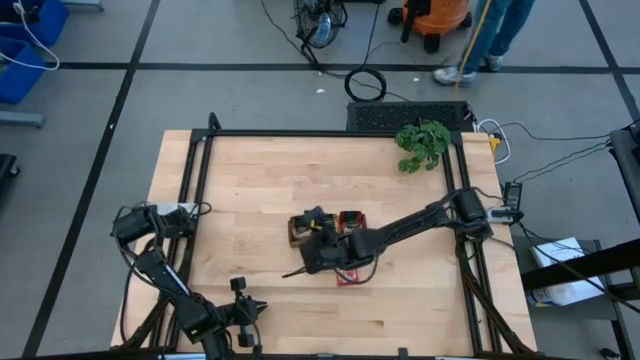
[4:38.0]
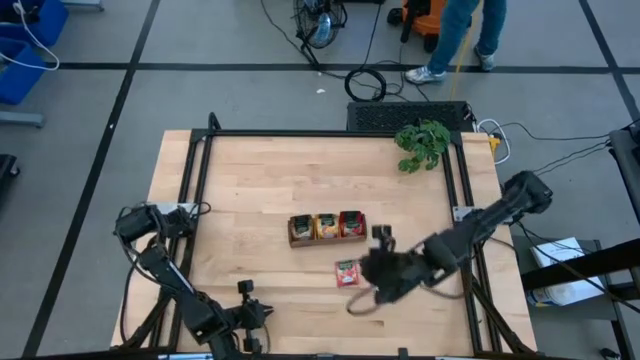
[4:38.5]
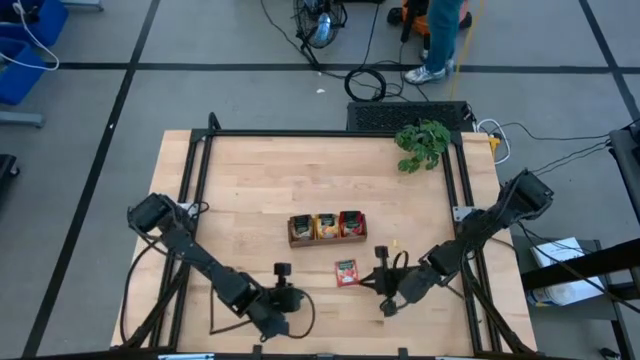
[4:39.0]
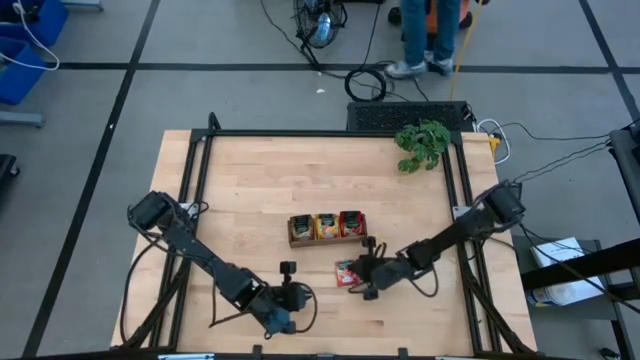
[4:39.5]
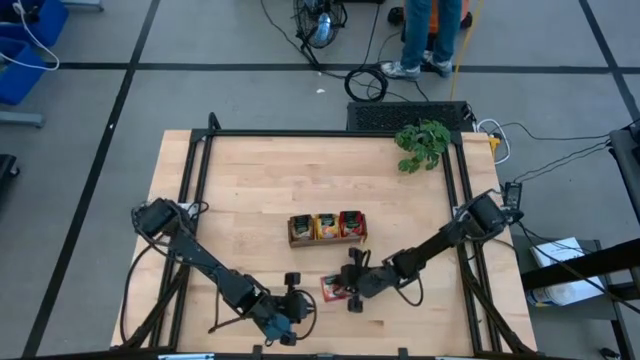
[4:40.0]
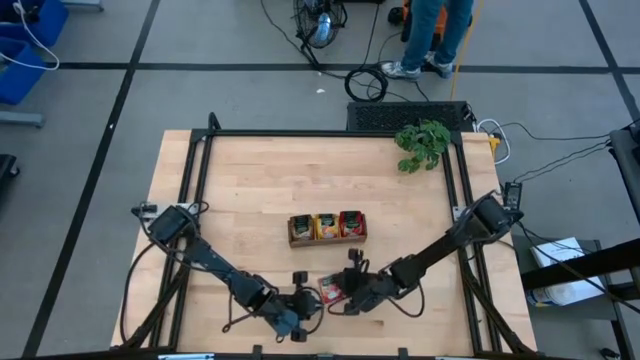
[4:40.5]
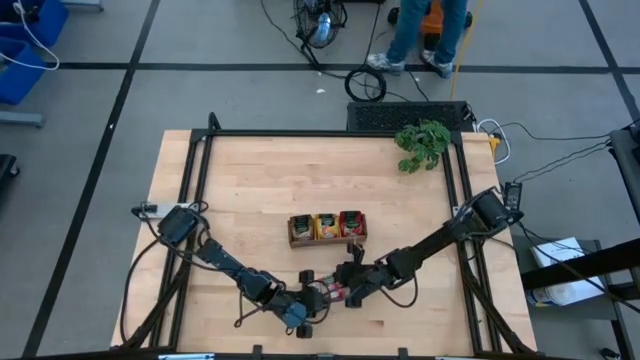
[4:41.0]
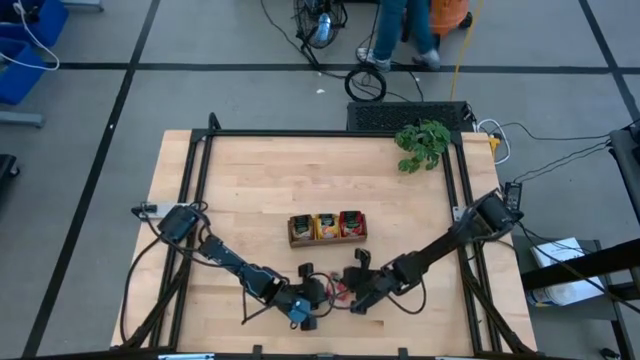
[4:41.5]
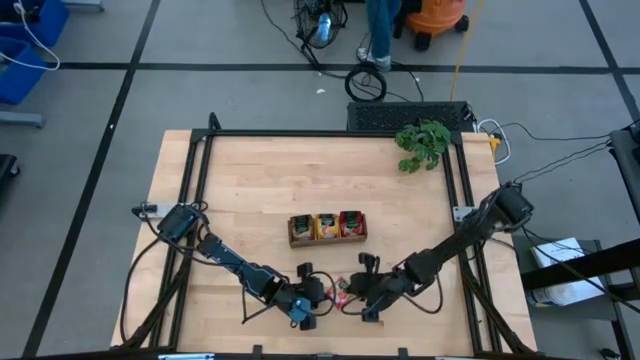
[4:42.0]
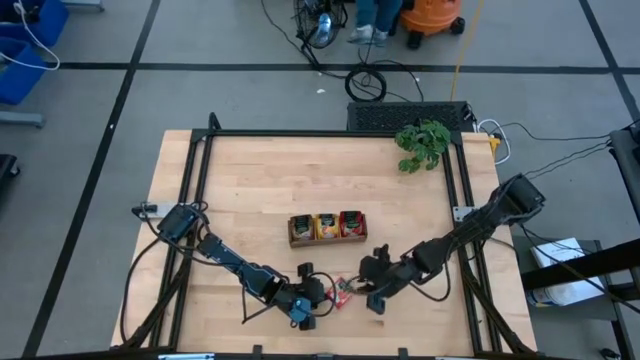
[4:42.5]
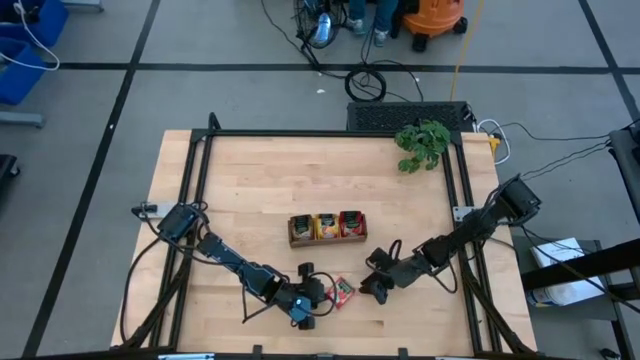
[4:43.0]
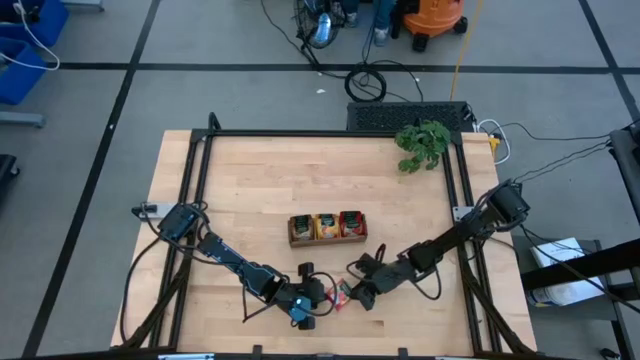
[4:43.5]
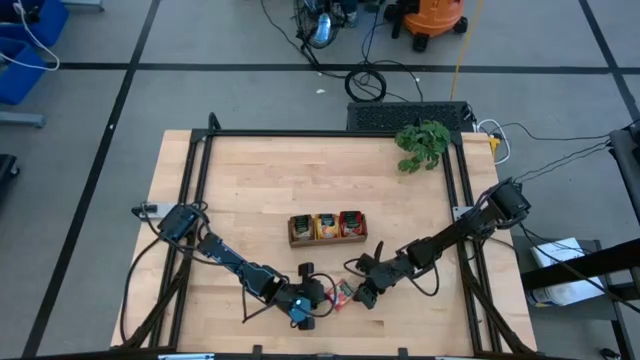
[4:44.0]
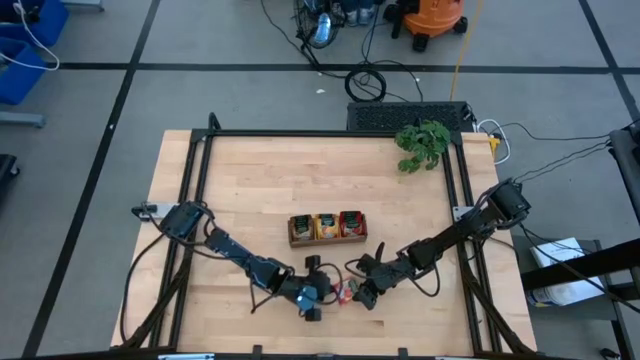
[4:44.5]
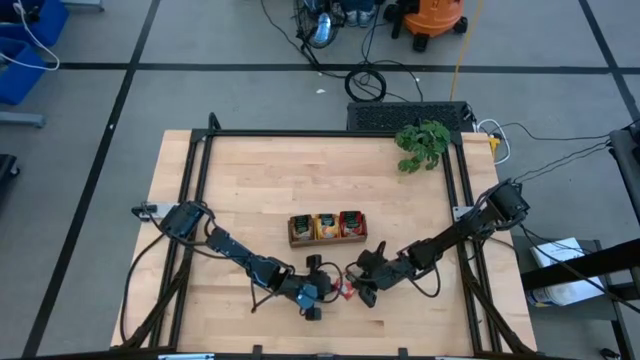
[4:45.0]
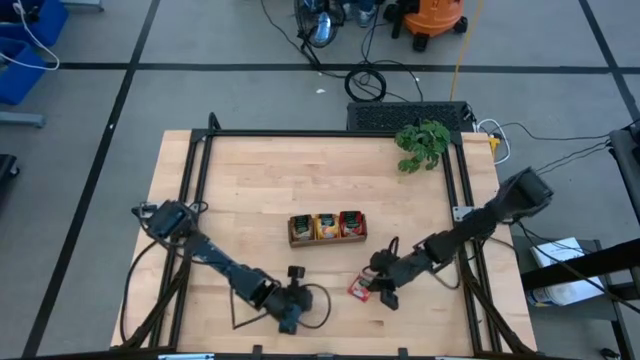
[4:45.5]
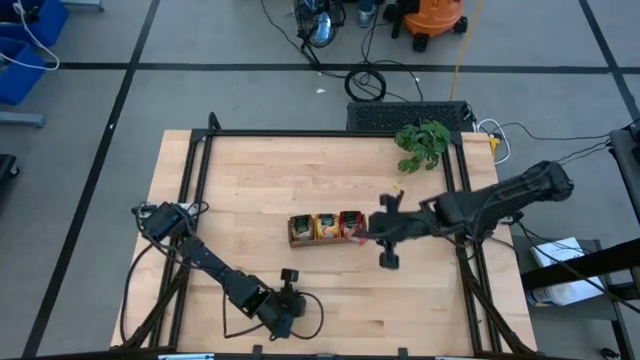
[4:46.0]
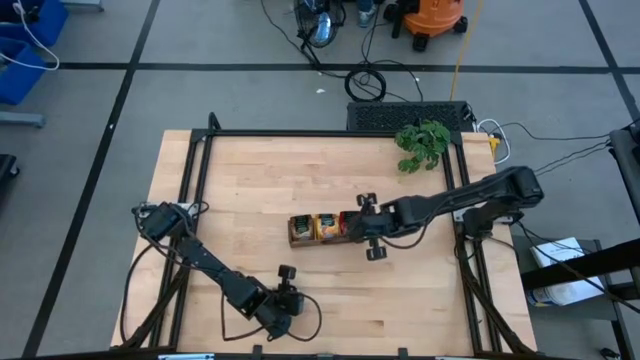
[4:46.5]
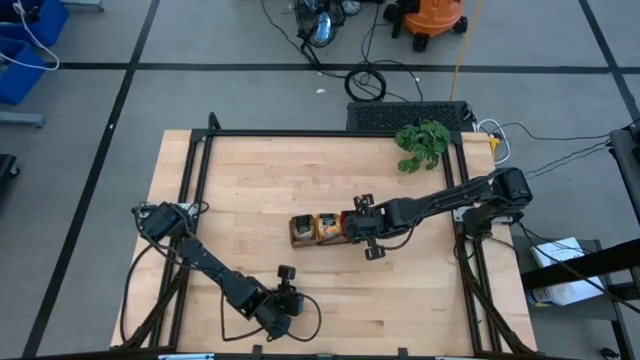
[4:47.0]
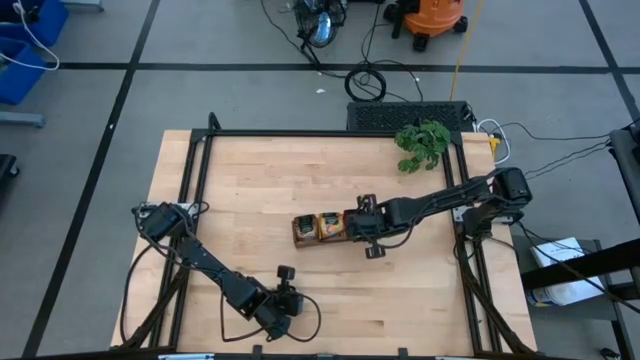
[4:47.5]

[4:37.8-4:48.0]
Task: Pick & Place Tea
Put the red tea bag into the right section of the wooden organizer

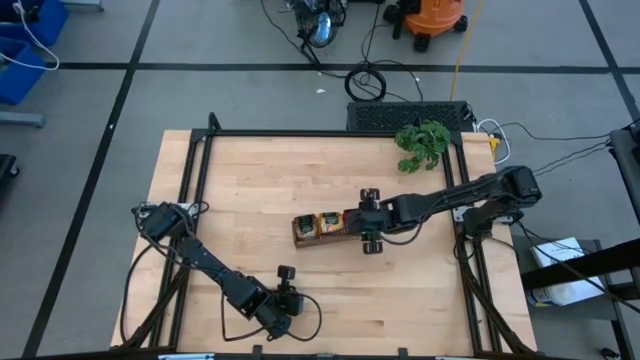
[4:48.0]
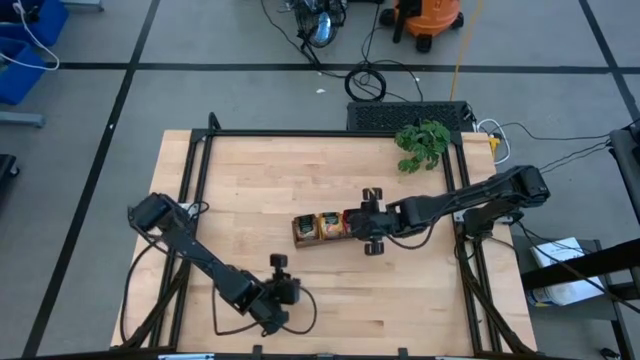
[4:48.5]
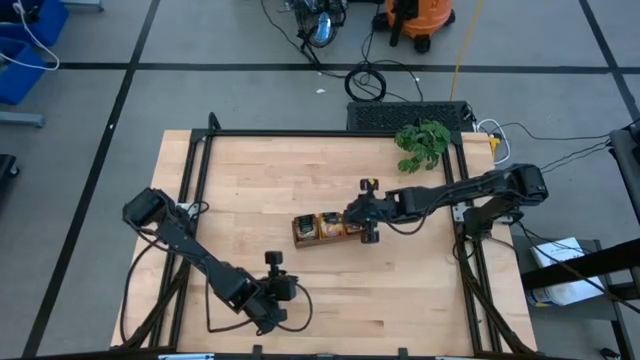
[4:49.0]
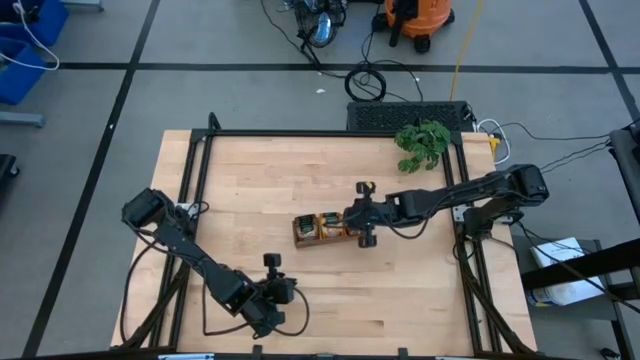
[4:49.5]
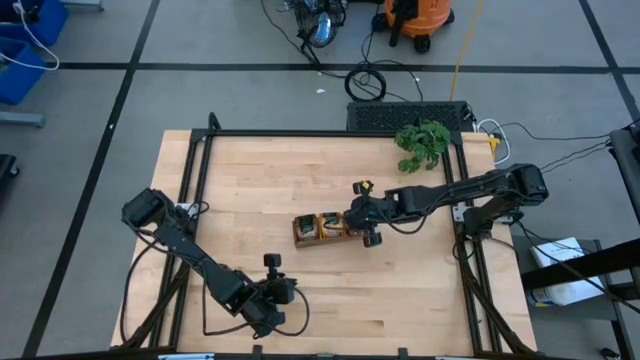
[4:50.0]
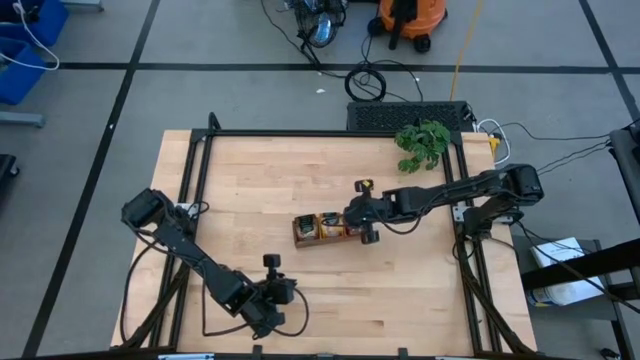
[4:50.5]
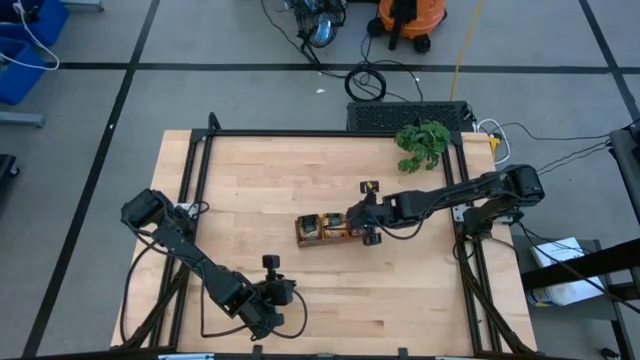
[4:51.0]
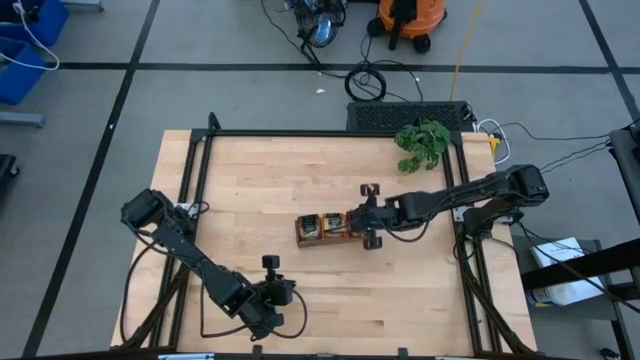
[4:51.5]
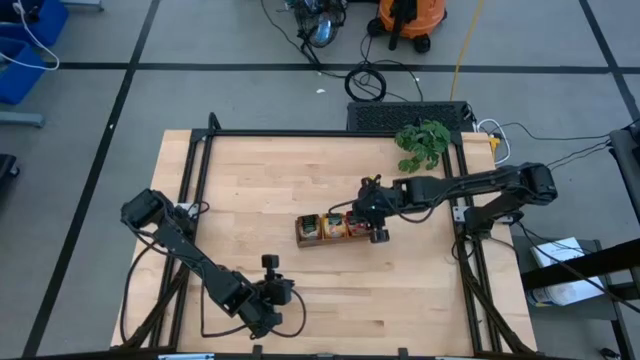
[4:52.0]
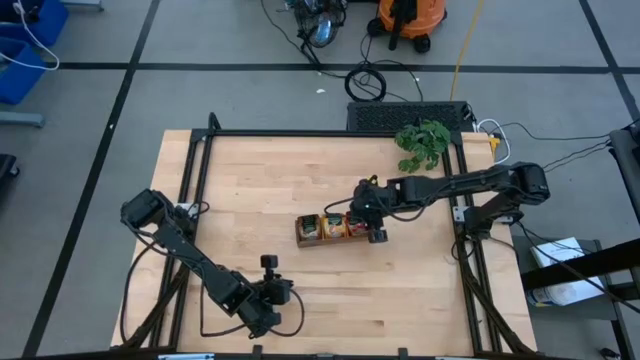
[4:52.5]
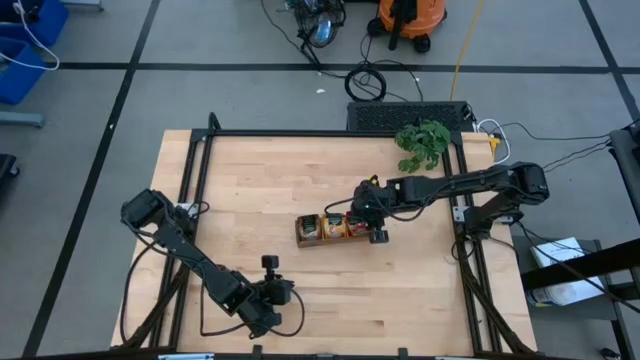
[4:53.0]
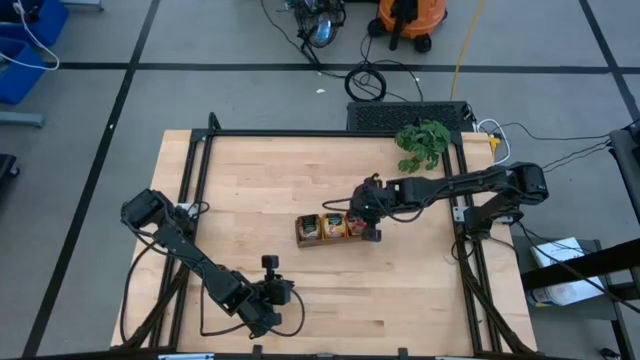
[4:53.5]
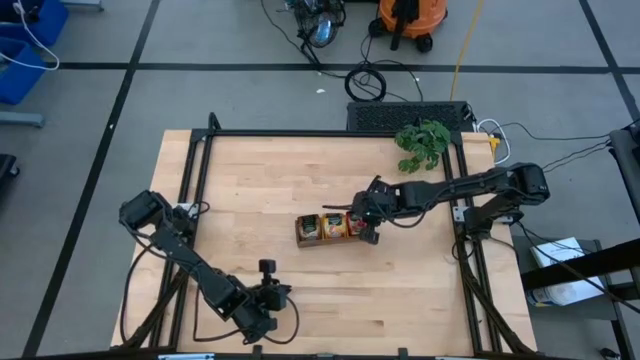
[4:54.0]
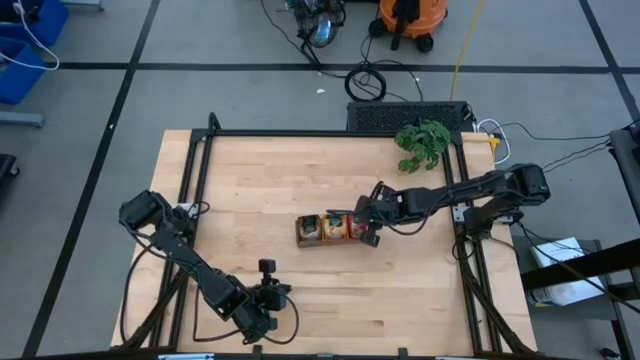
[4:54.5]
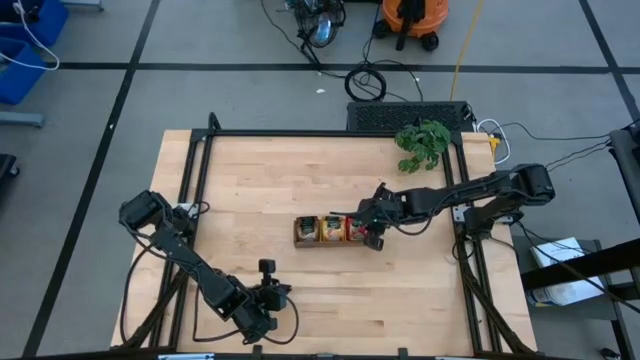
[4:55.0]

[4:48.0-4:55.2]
Adjust the red tea bags in the wooden organizer

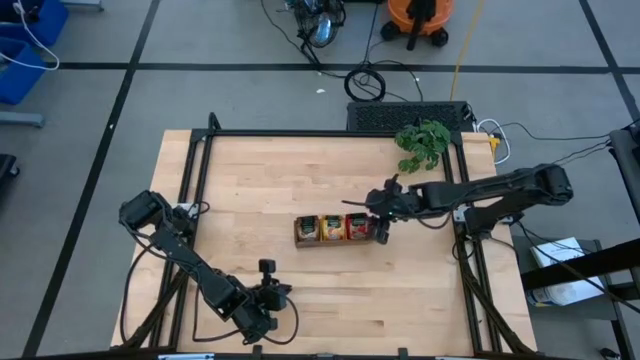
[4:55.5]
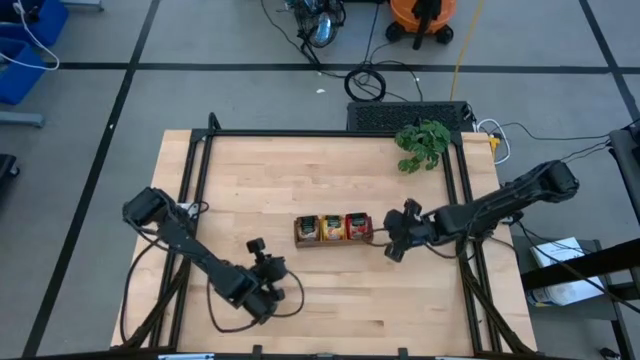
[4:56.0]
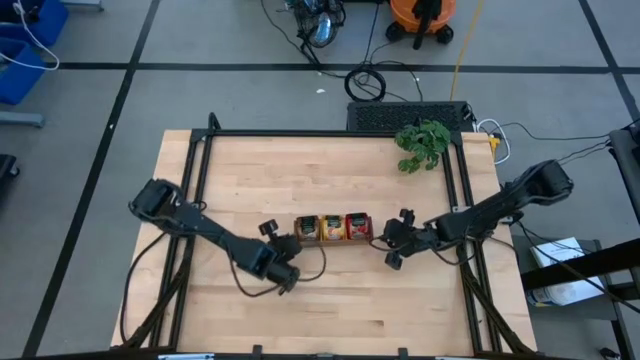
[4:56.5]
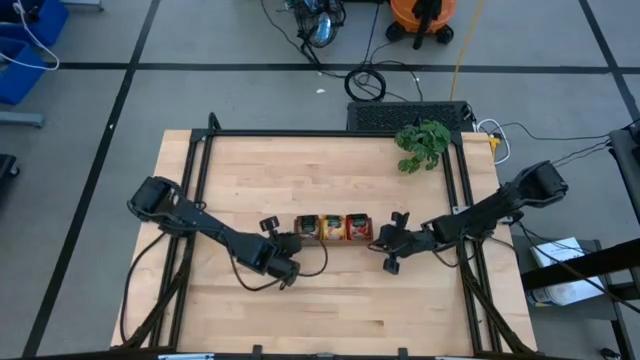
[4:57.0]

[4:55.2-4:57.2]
Adjust the wooden organizer

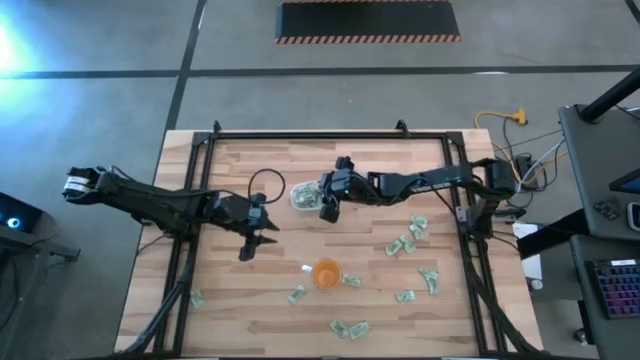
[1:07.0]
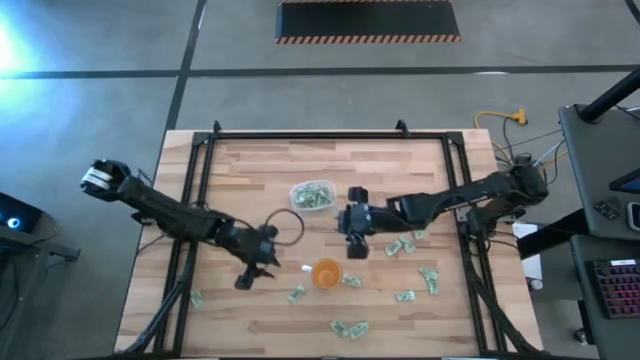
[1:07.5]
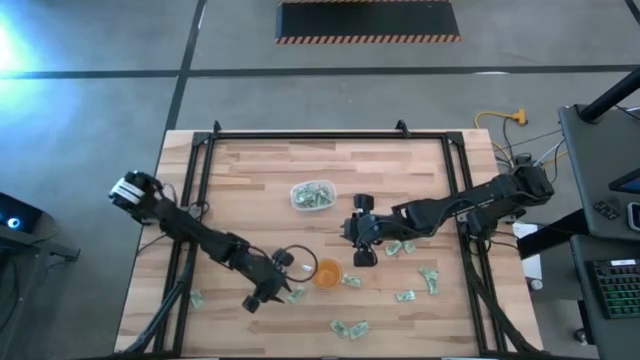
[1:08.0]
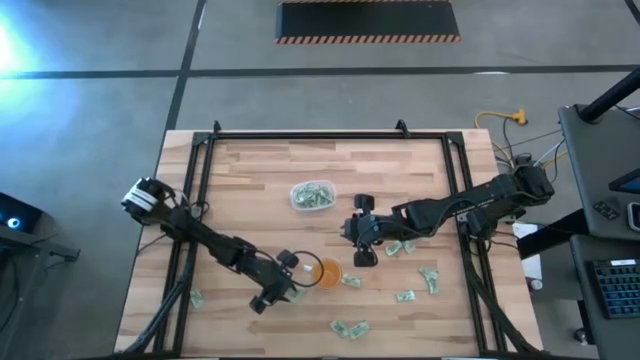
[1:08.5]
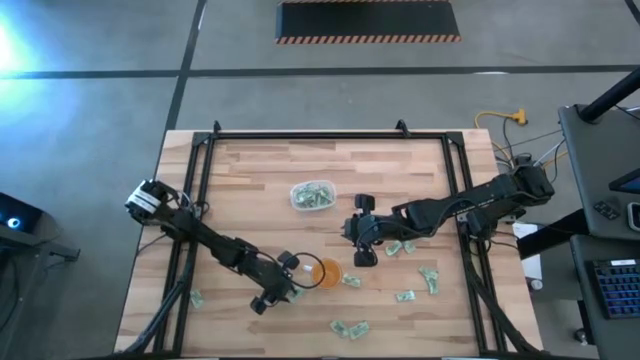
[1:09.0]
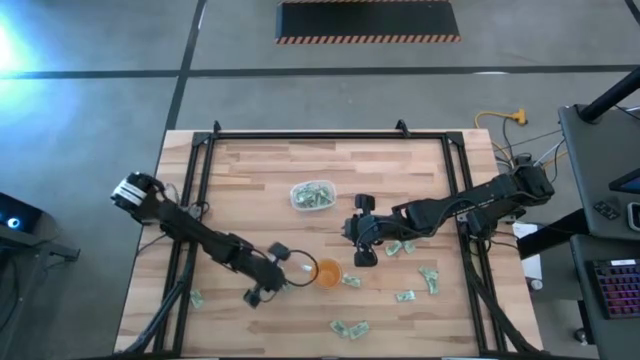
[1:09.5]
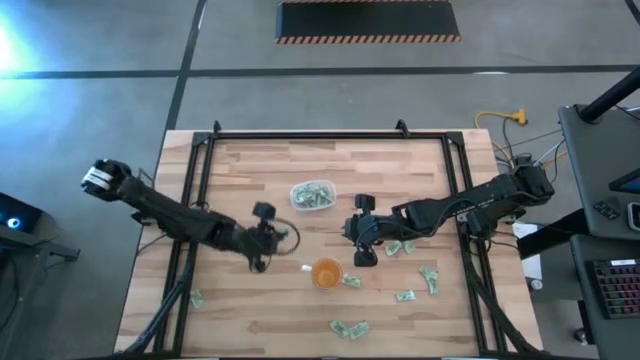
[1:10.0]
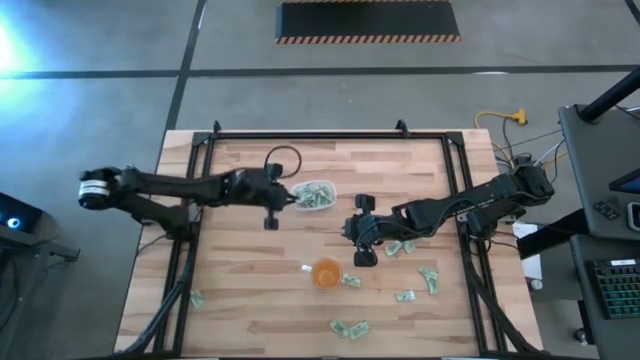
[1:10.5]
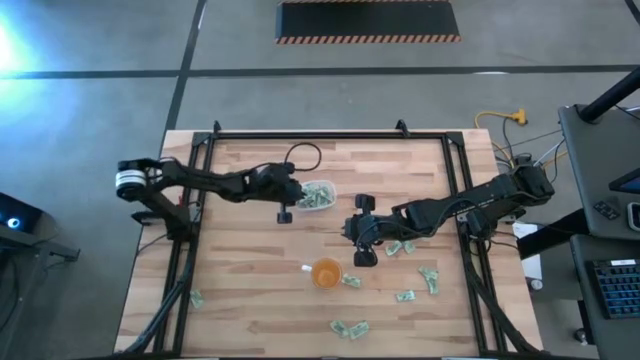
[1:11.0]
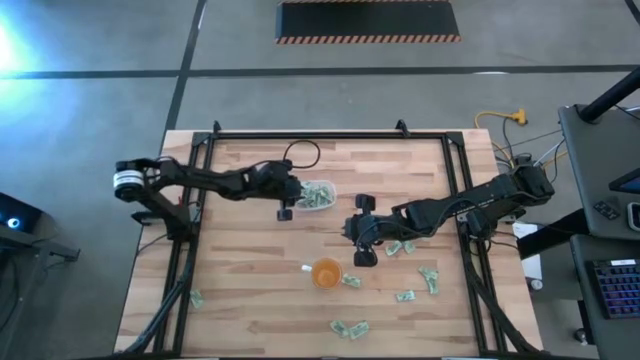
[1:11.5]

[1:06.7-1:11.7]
Task: Pick and place Stevia / Truvia into bins
Put the stevia packet into the transparent bin
